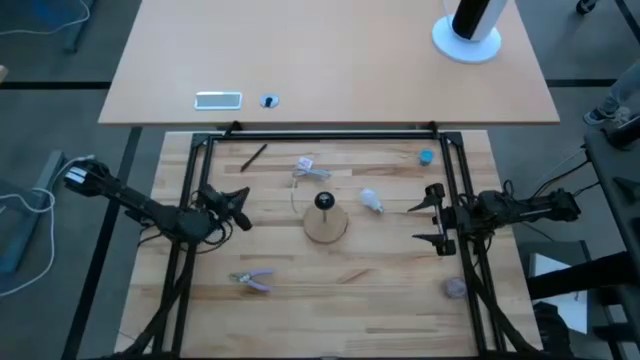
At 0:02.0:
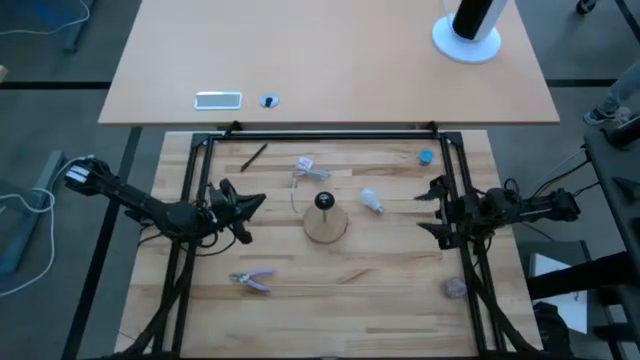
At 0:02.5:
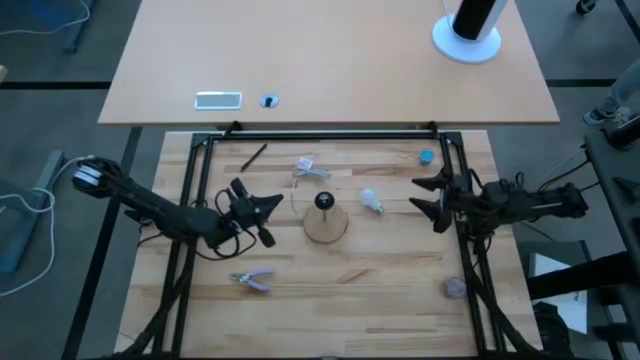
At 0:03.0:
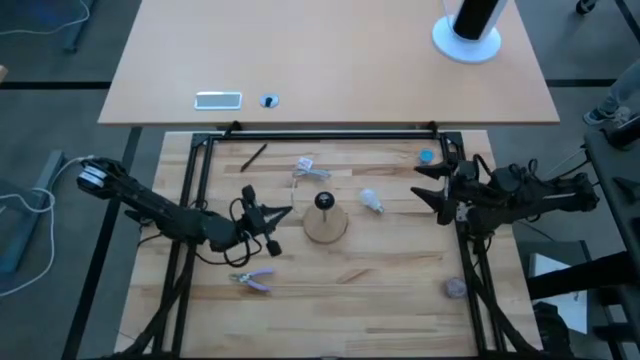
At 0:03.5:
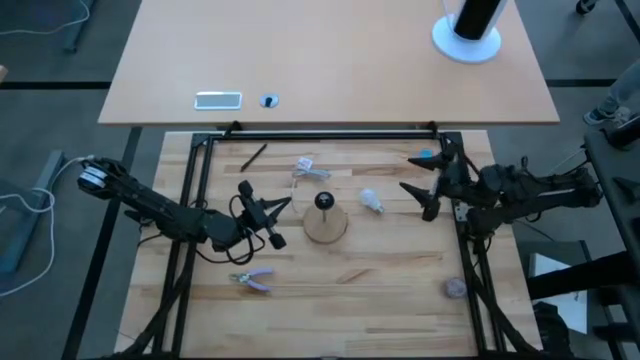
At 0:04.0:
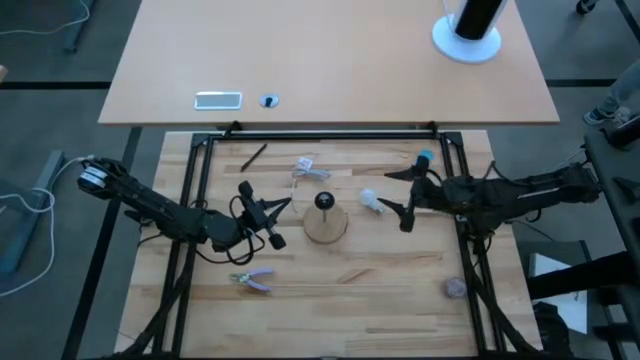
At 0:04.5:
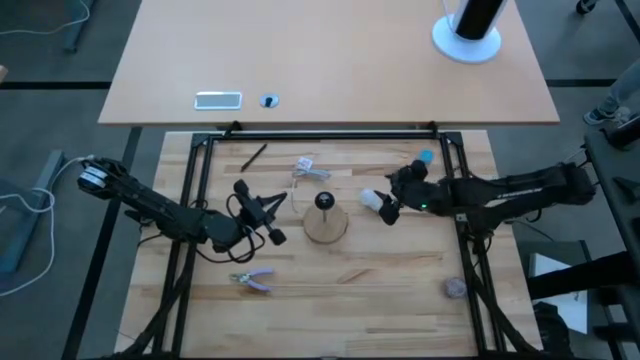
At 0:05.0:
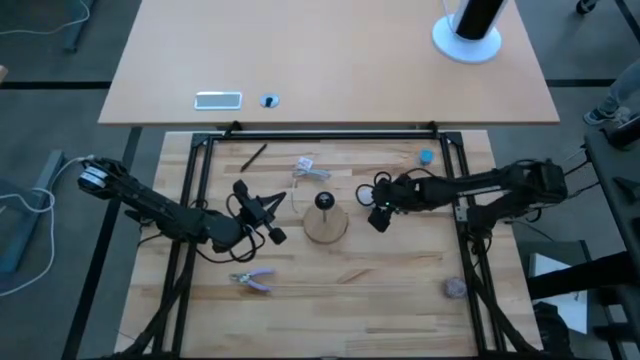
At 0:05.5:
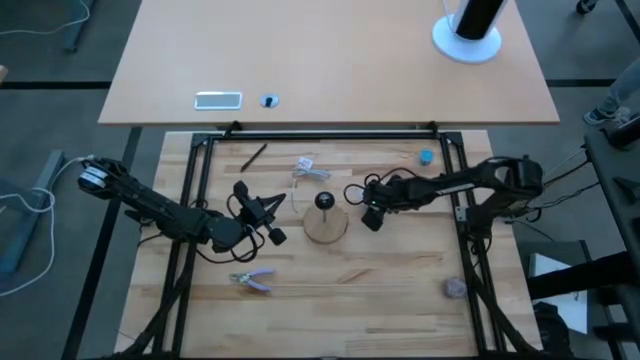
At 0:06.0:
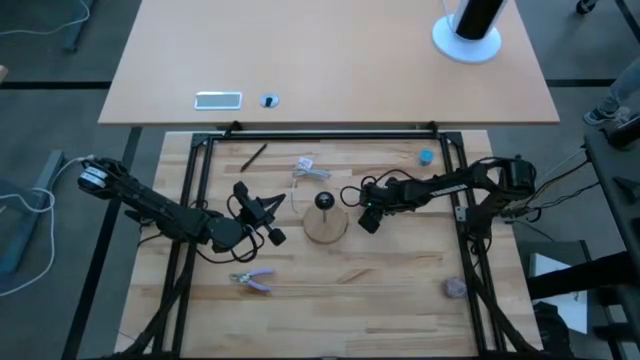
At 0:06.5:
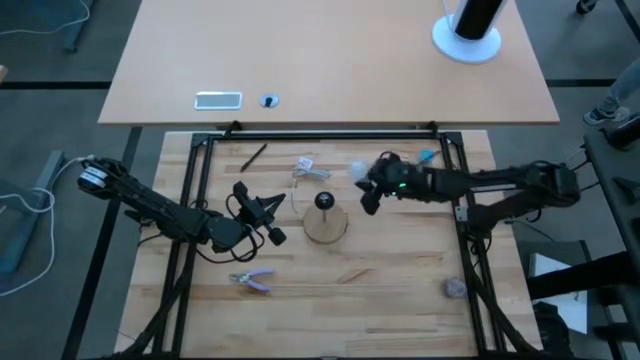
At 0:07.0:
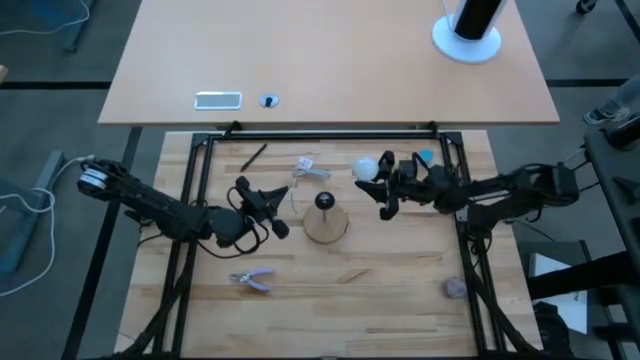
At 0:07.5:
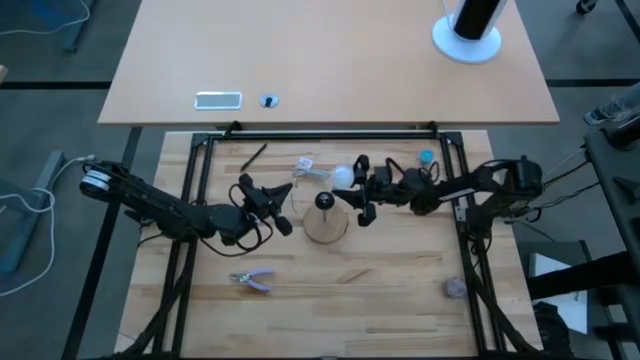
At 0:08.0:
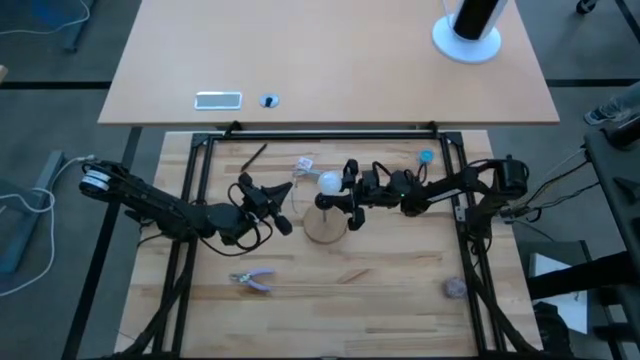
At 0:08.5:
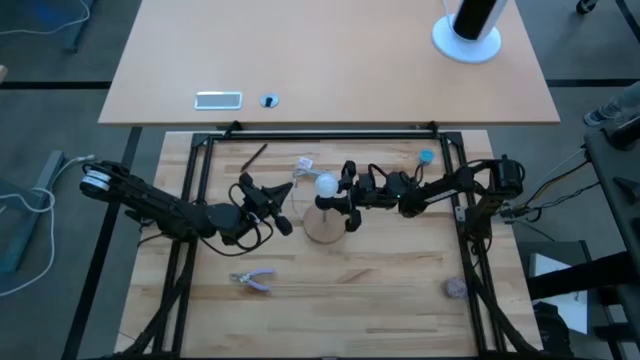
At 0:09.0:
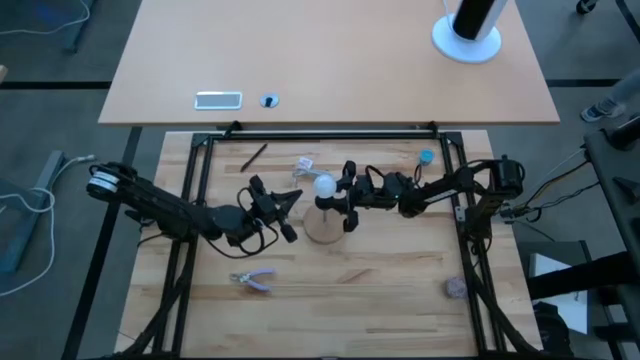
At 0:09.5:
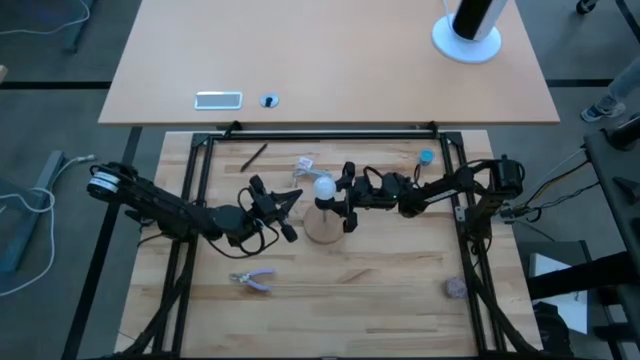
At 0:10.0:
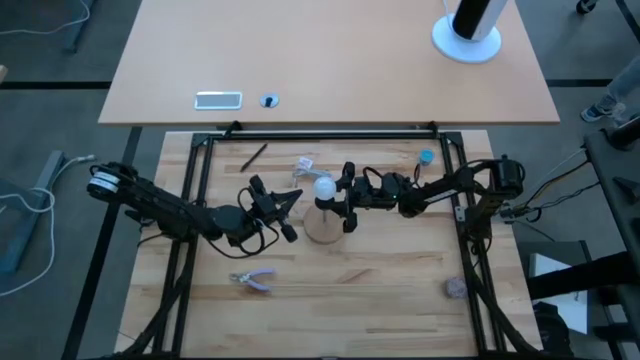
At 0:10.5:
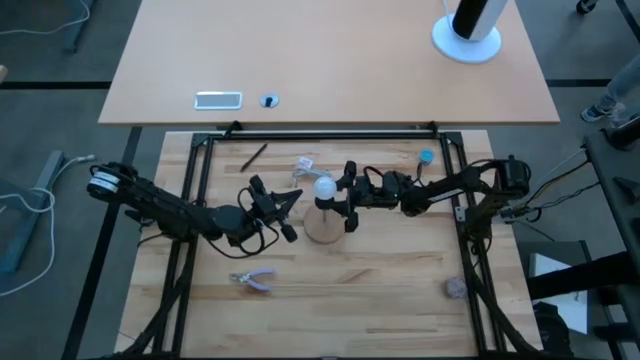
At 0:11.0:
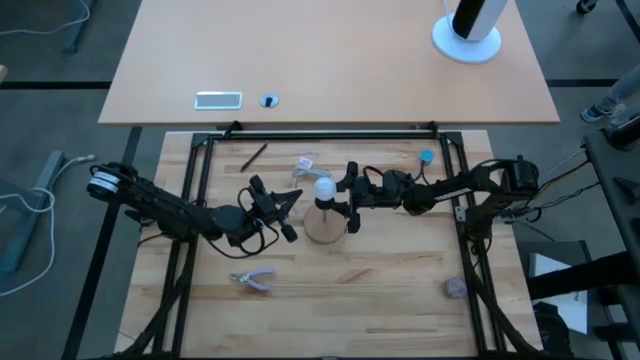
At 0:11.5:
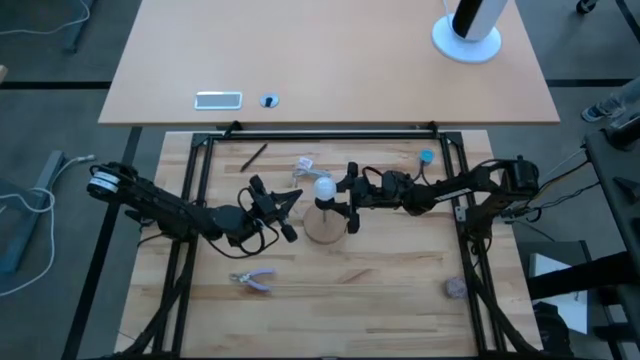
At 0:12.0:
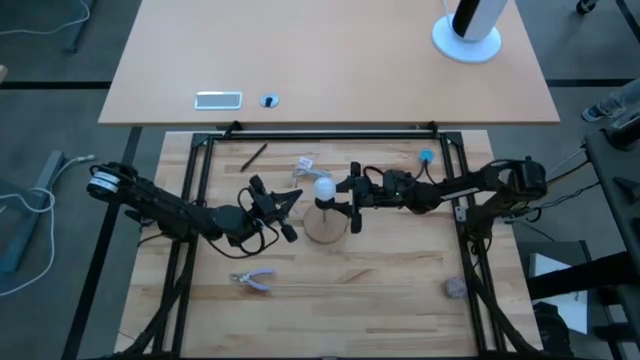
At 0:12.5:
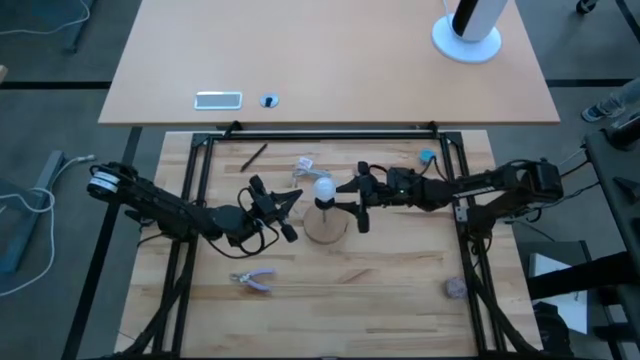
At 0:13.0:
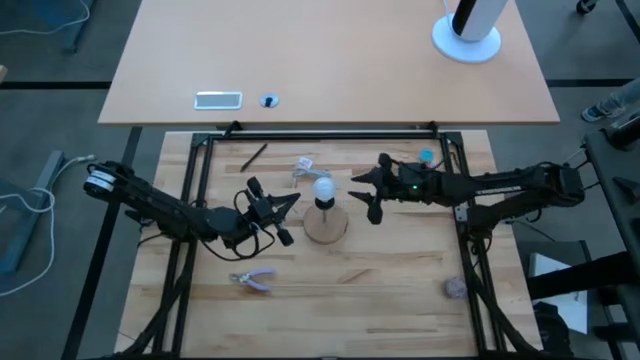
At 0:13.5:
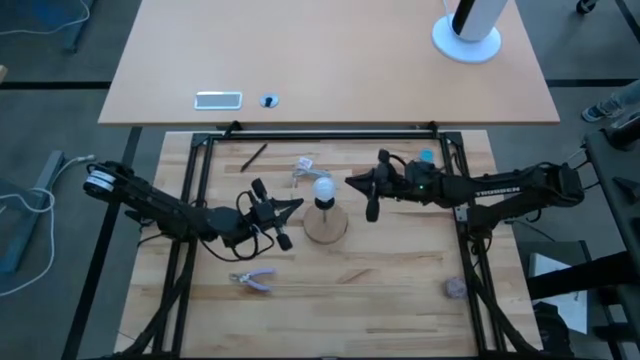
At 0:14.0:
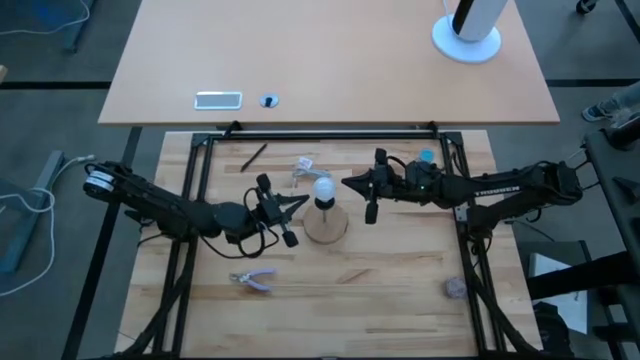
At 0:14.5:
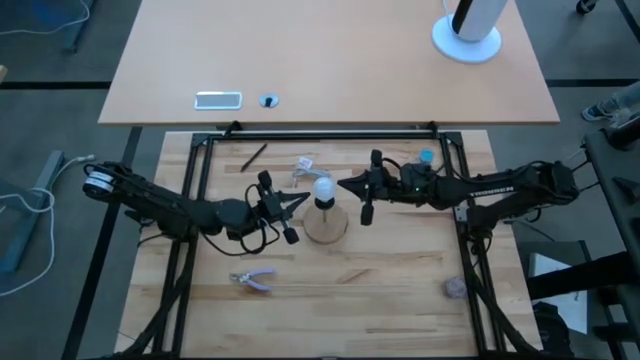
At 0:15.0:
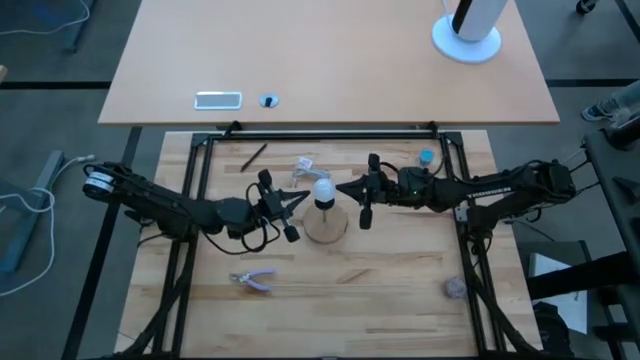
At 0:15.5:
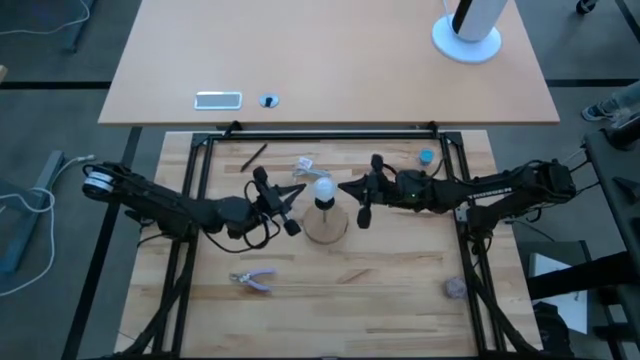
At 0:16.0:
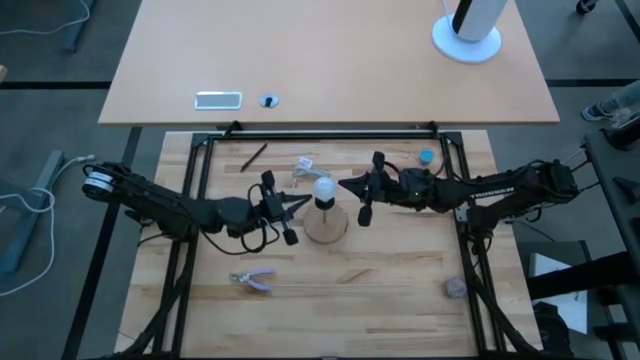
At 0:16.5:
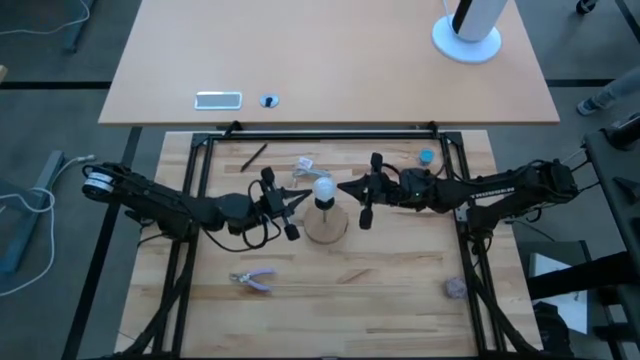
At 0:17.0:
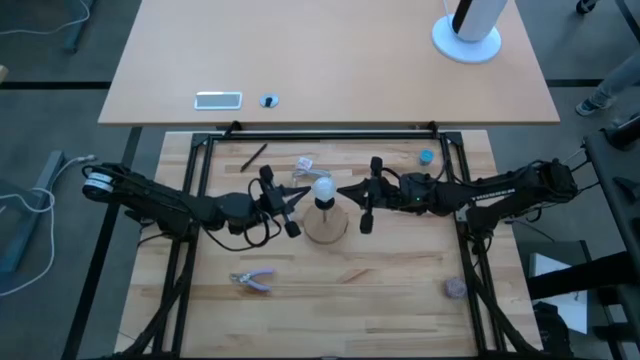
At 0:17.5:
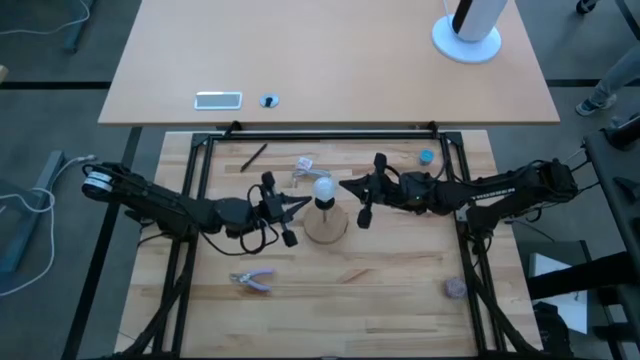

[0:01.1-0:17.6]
Task: Screw lightbulb
Insert the lightbulb into the lamp

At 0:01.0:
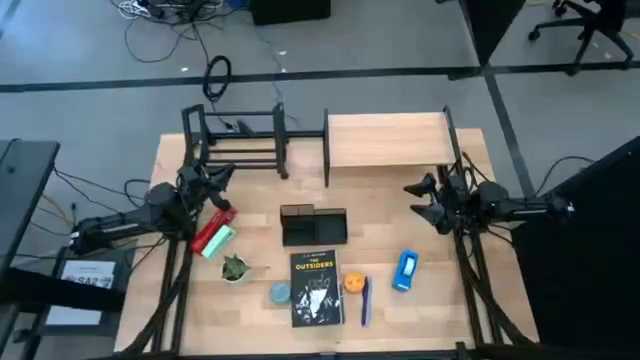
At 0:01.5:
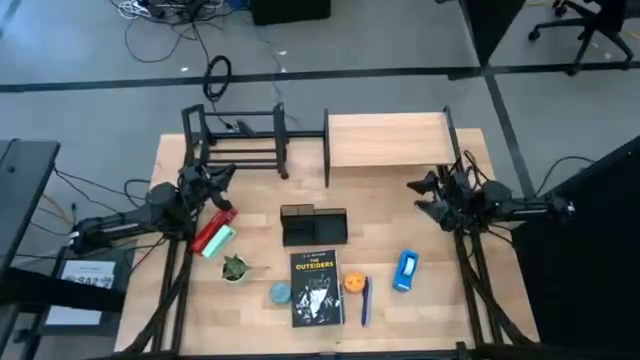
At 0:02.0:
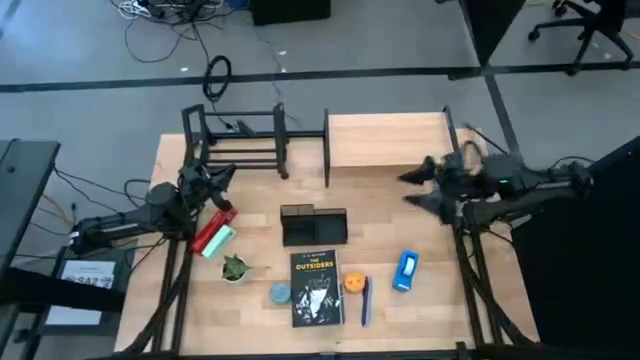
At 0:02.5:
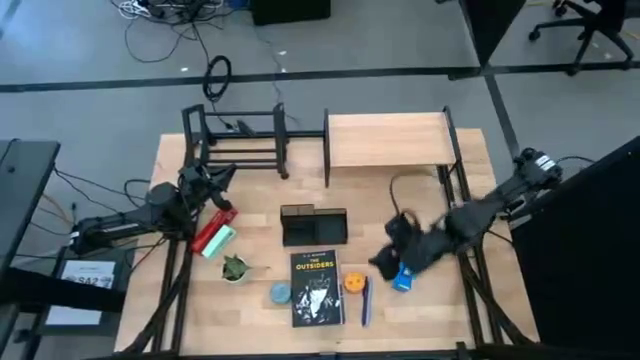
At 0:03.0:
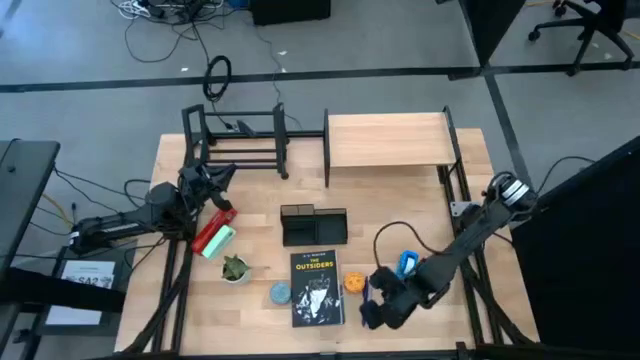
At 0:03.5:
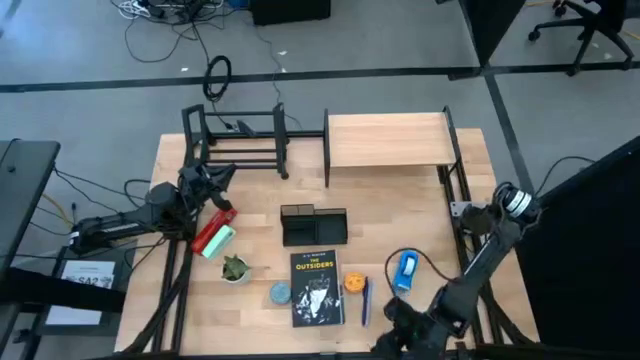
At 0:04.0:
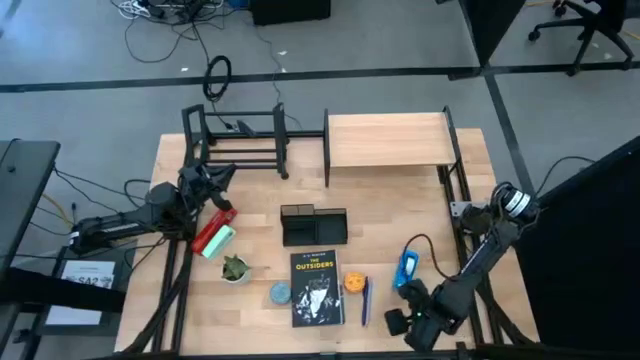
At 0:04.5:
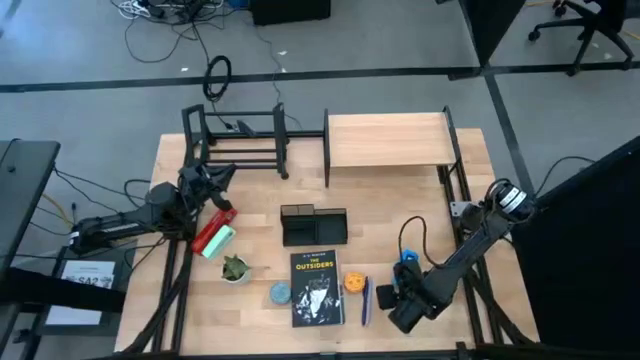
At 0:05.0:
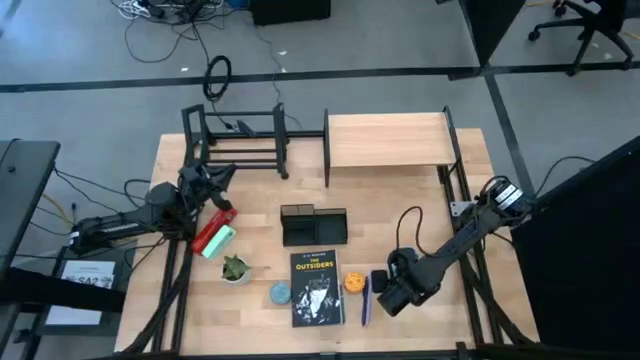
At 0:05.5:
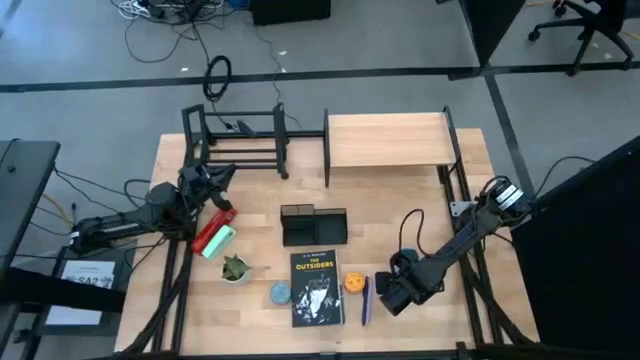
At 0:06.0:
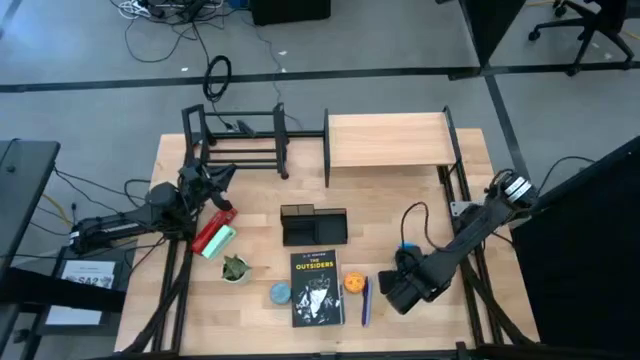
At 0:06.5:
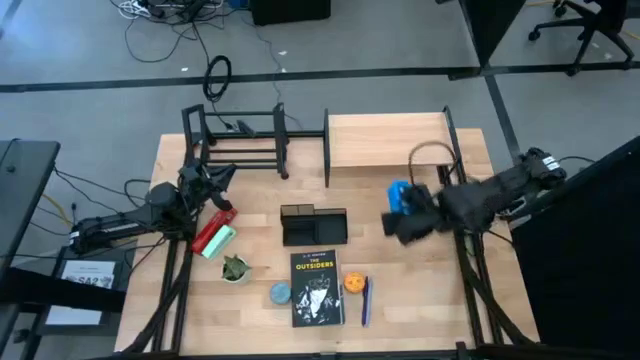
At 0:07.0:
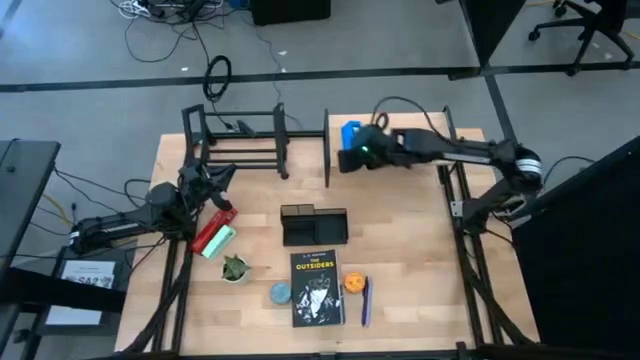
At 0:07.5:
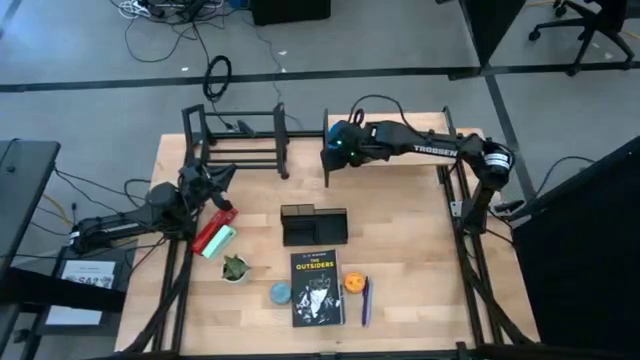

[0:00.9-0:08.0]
Task: Stock shelves
Put the blue tape dispenser on the shelf
